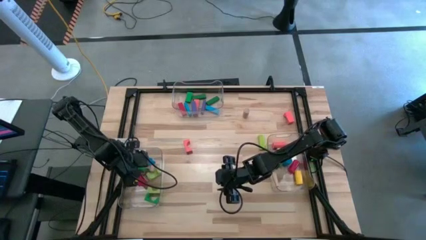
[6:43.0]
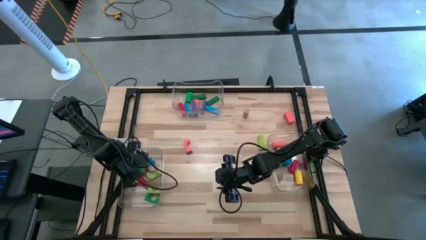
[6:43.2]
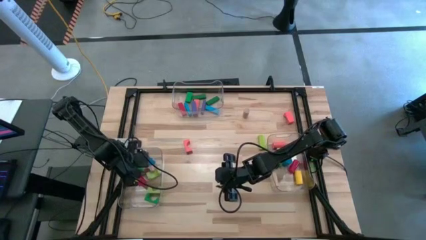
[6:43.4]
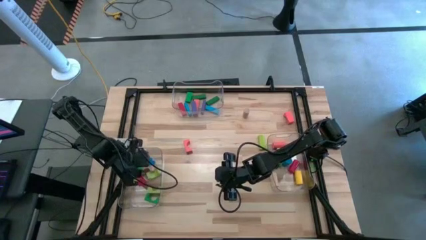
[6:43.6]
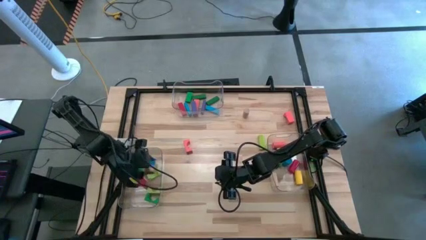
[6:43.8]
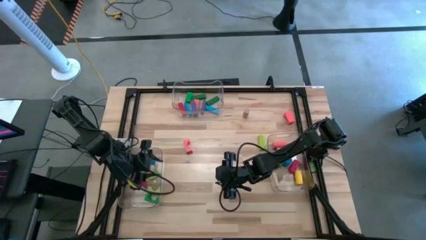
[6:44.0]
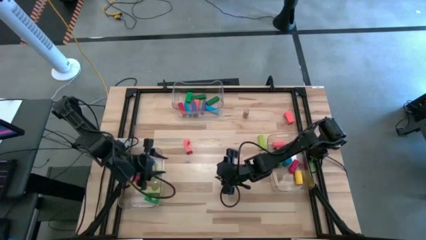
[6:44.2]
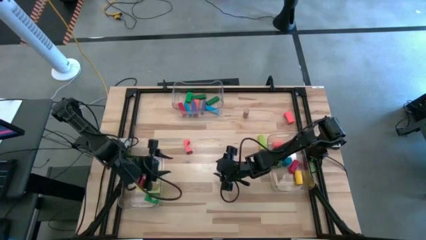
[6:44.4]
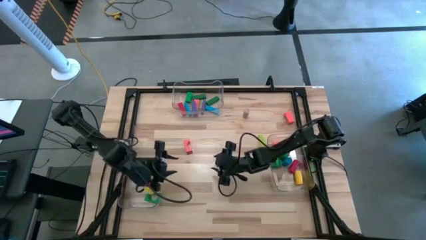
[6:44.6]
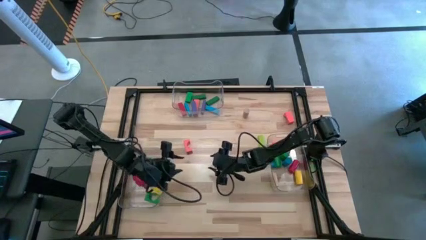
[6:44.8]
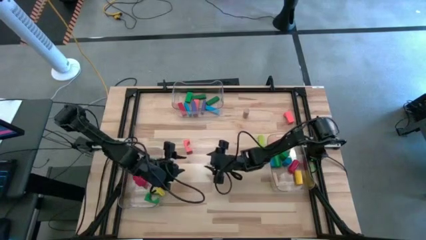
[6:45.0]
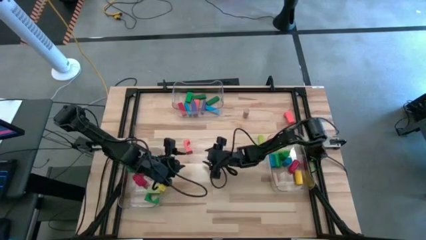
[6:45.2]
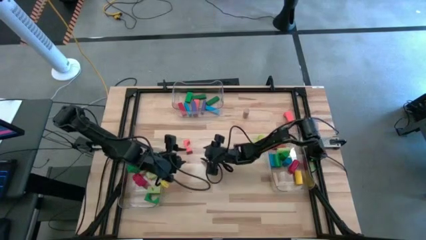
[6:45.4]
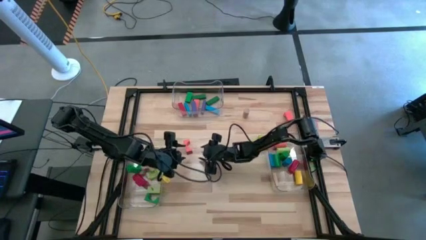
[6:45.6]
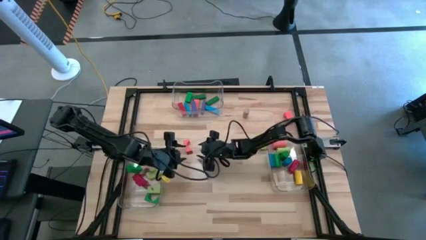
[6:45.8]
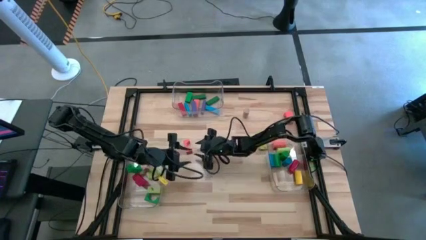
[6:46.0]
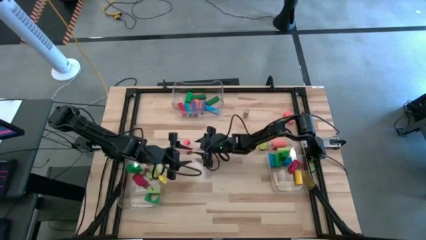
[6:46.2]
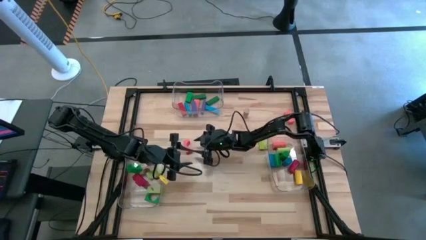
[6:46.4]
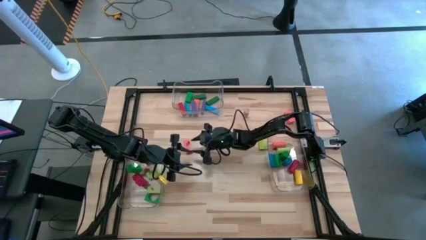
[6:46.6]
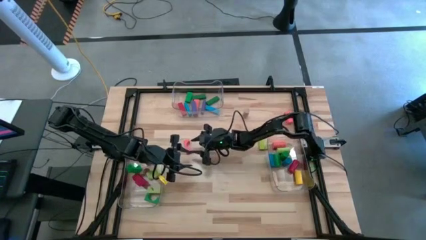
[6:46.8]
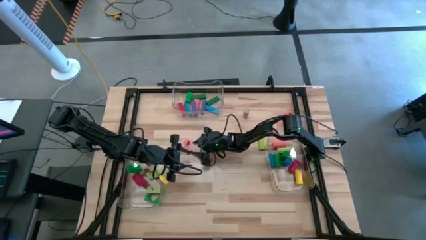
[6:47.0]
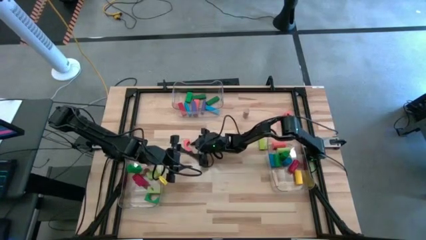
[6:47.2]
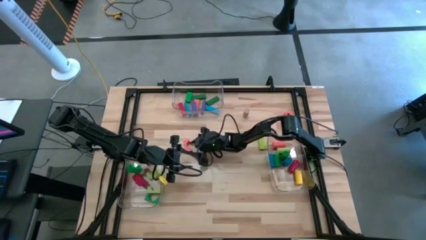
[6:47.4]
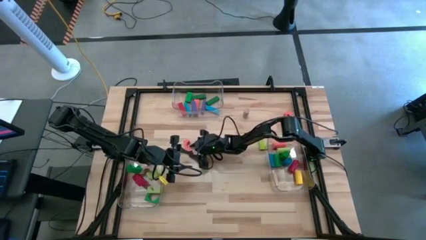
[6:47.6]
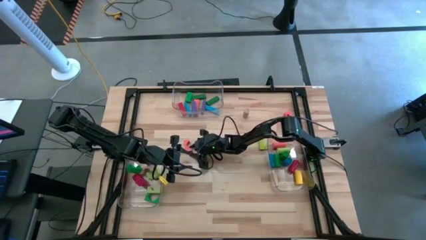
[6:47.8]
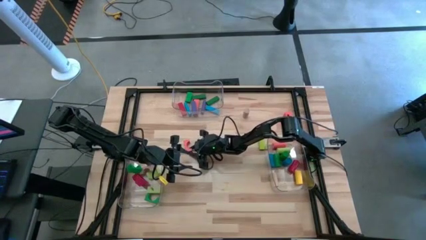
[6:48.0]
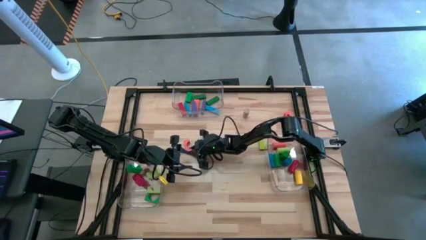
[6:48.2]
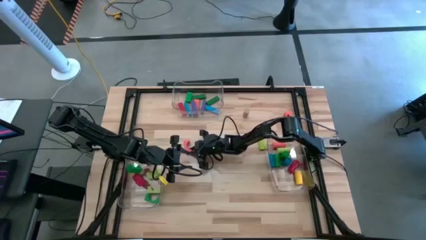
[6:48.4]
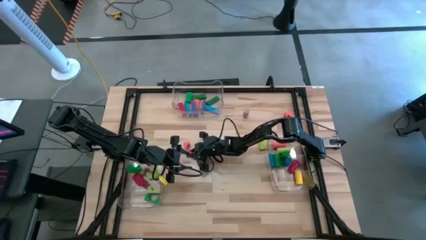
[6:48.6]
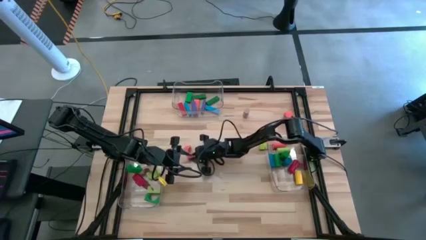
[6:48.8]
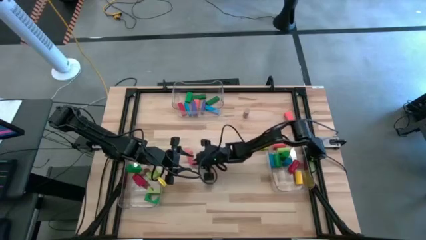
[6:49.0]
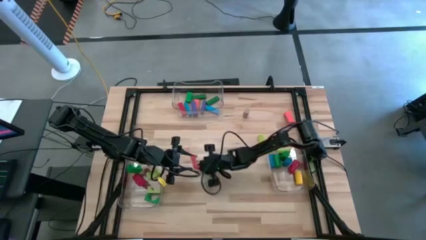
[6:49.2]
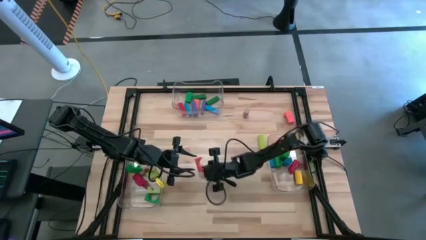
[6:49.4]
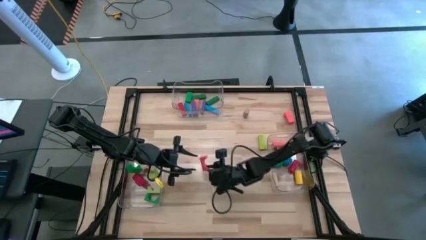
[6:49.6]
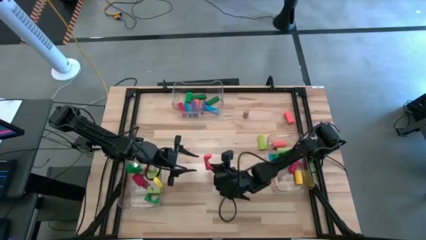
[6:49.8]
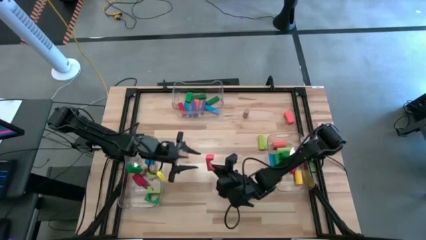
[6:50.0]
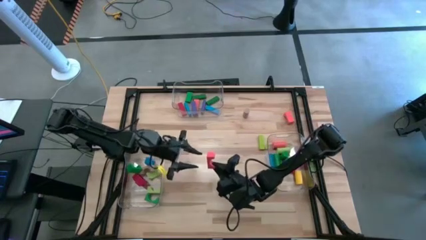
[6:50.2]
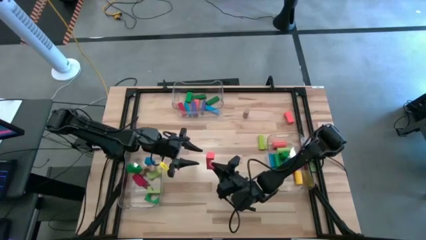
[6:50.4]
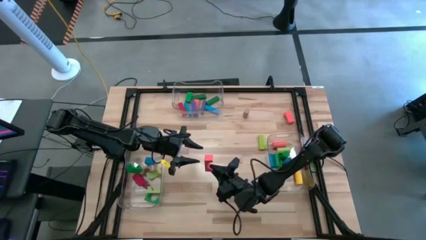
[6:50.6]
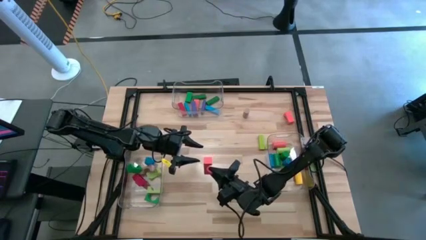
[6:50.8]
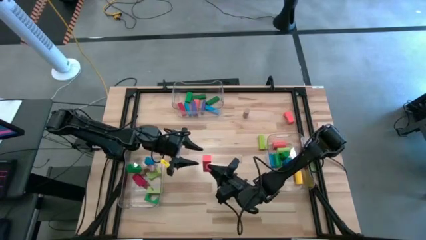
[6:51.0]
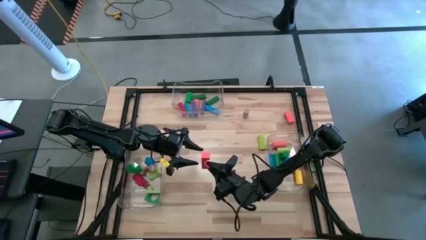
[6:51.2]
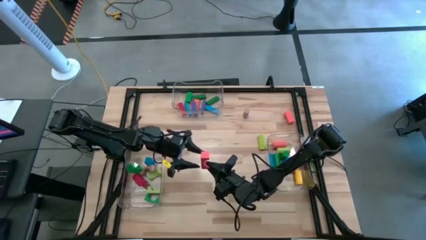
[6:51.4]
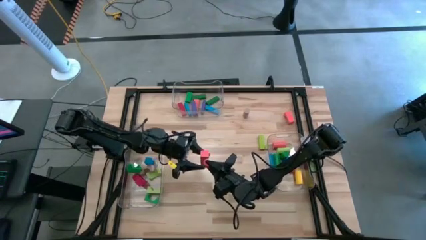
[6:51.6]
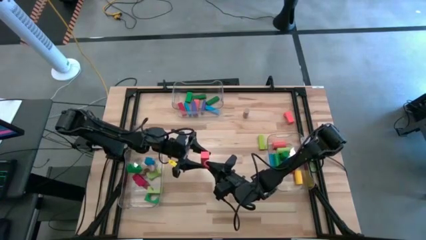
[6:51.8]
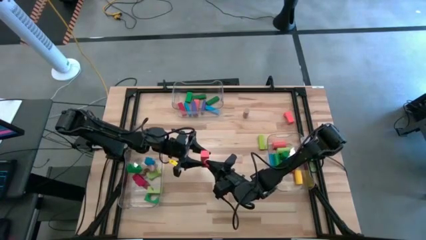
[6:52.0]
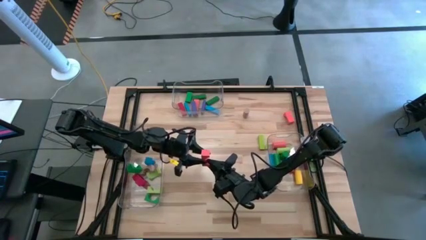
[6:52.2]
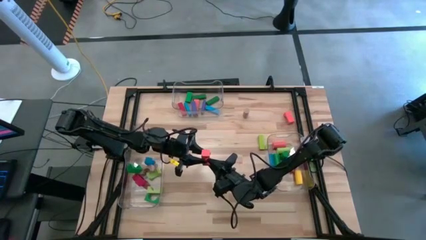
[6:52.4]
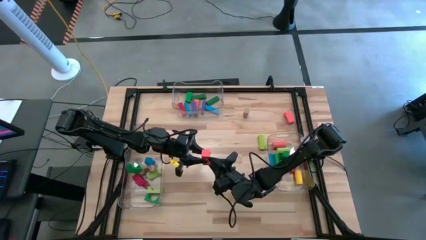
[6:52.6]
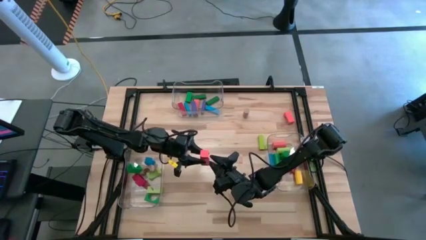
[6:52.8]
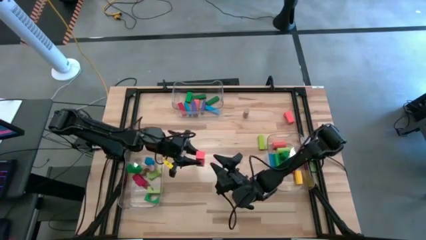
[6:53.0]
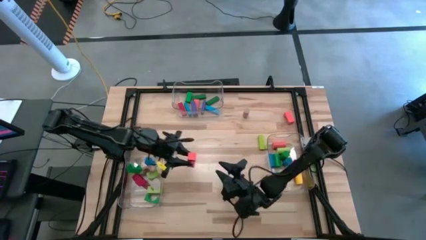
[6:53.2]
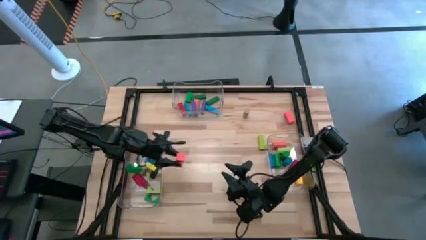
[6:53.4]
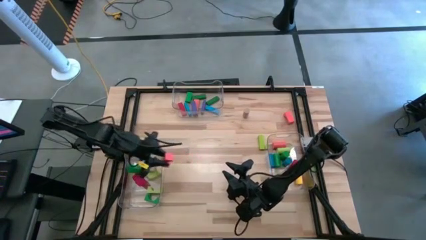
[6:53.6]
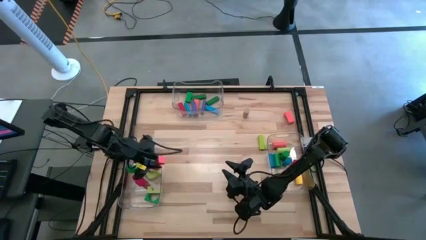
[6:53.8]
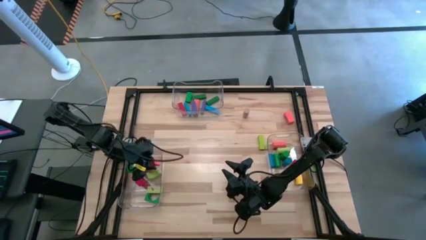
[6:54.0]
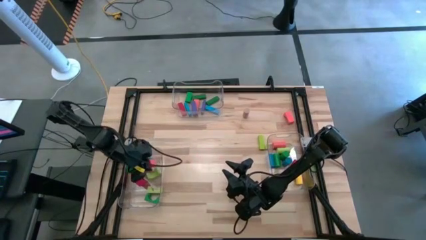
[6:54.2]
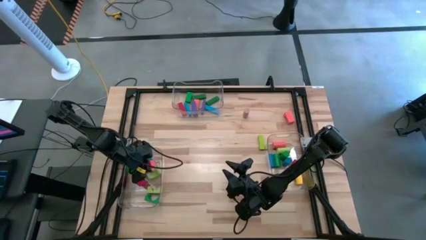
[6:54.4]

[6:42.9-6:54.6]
Task: Sort blocks by size
Put the orange arc block into the left transparent bin
